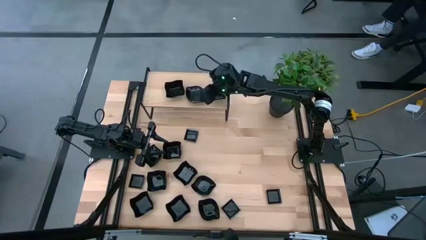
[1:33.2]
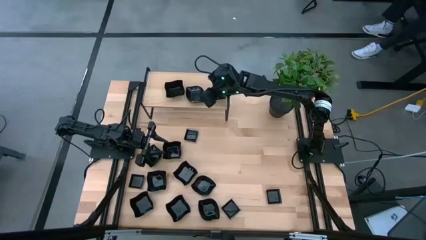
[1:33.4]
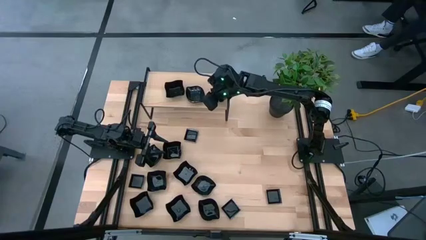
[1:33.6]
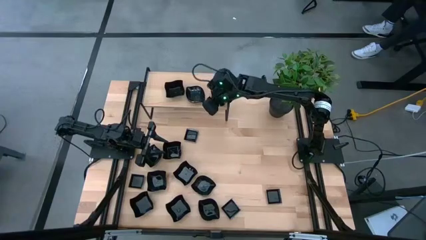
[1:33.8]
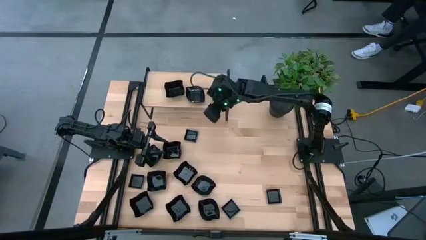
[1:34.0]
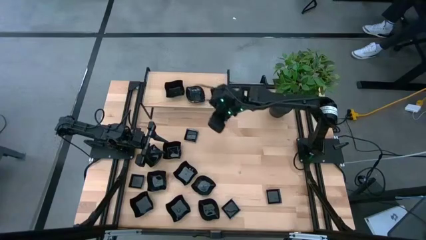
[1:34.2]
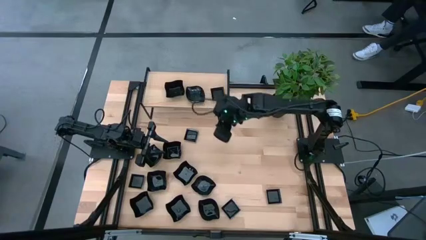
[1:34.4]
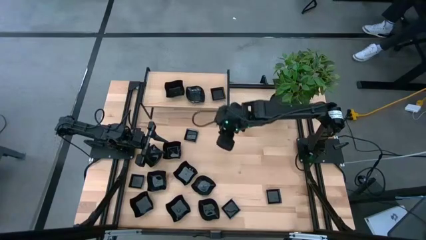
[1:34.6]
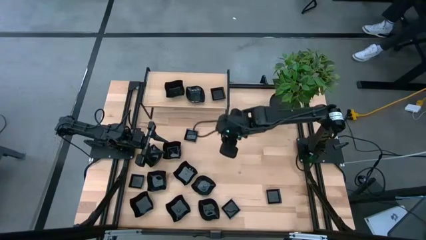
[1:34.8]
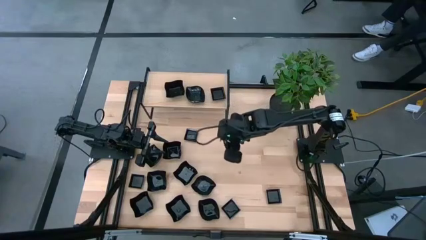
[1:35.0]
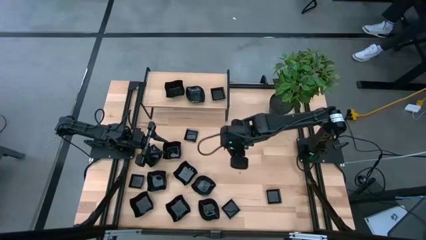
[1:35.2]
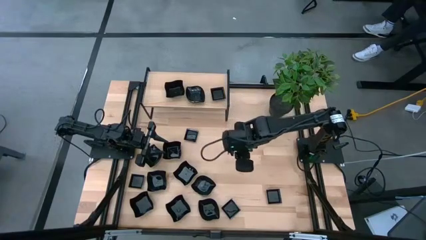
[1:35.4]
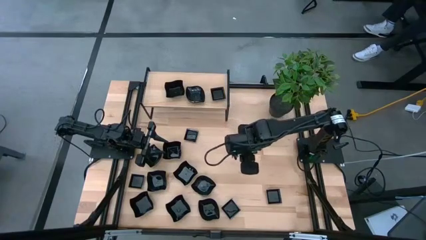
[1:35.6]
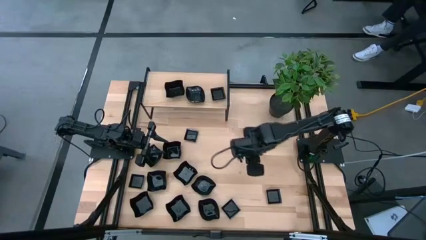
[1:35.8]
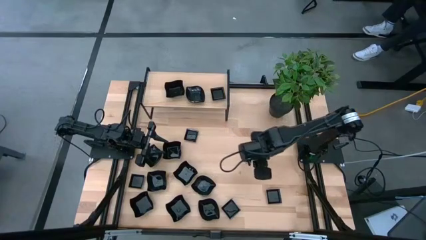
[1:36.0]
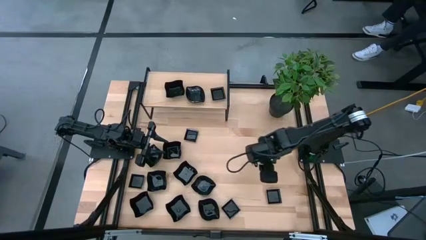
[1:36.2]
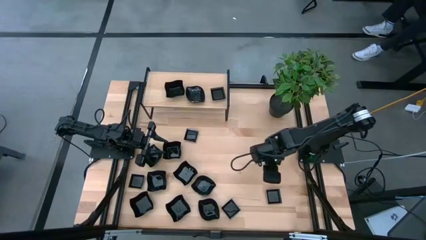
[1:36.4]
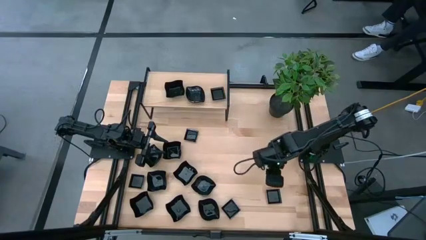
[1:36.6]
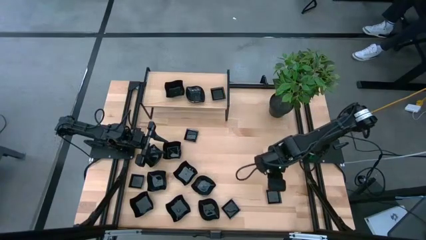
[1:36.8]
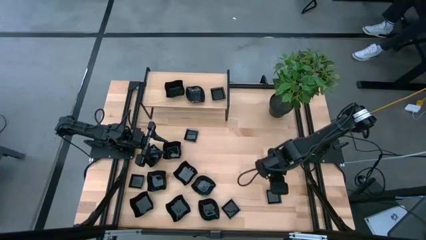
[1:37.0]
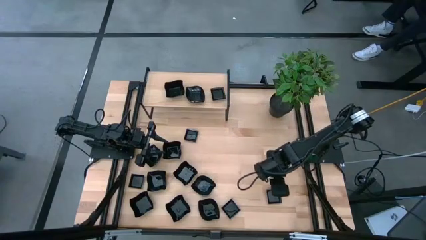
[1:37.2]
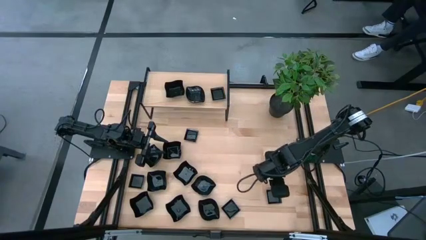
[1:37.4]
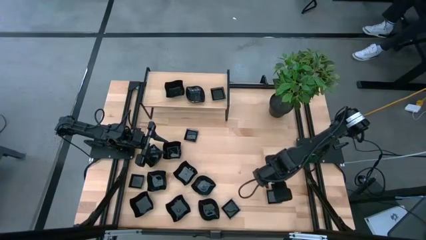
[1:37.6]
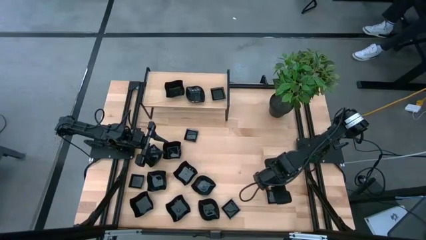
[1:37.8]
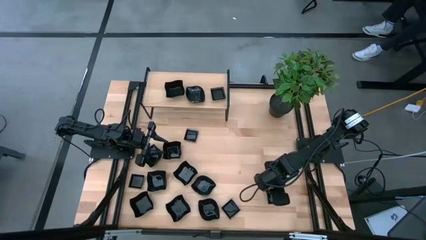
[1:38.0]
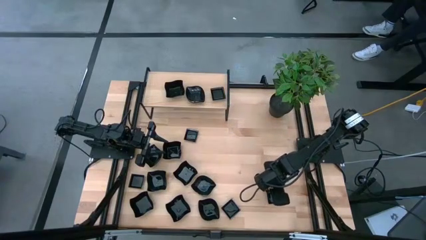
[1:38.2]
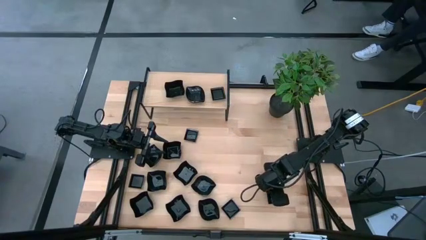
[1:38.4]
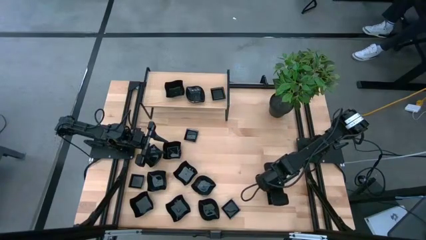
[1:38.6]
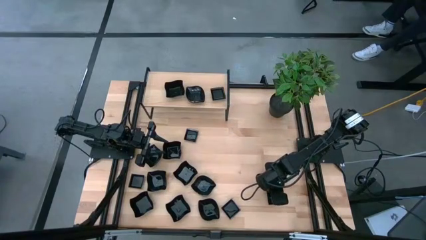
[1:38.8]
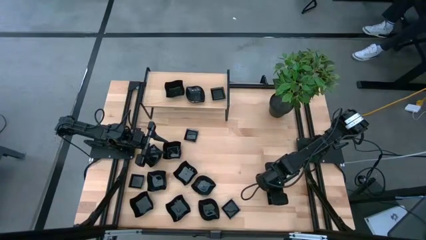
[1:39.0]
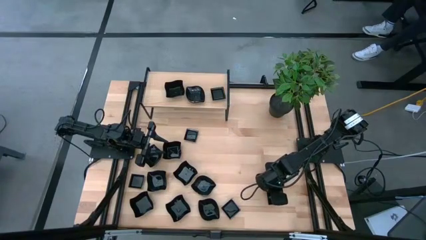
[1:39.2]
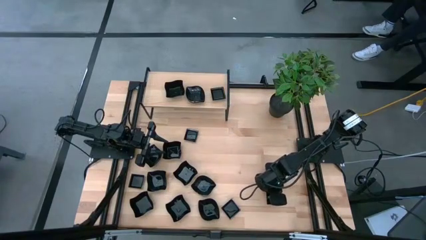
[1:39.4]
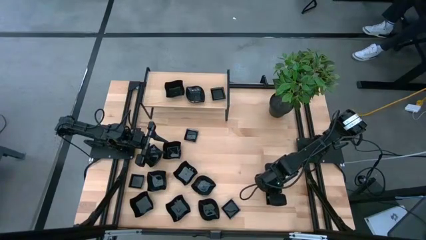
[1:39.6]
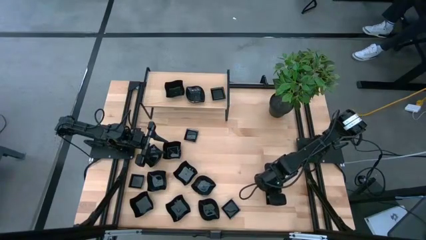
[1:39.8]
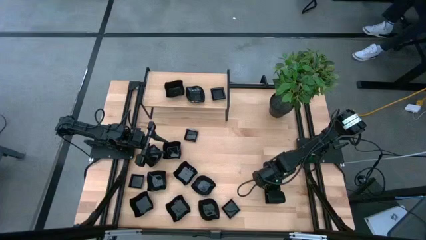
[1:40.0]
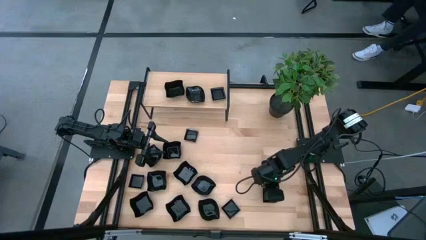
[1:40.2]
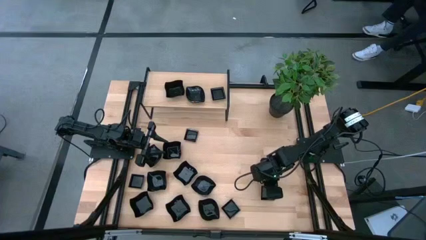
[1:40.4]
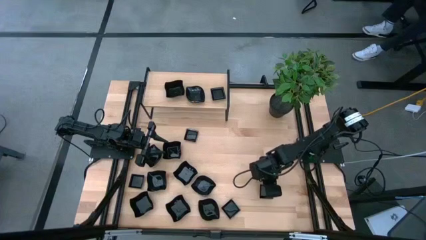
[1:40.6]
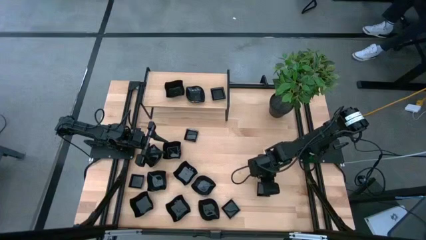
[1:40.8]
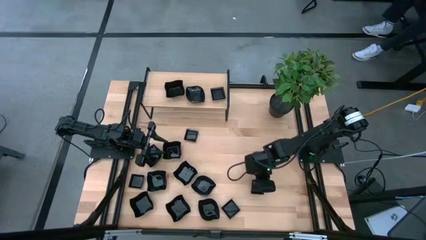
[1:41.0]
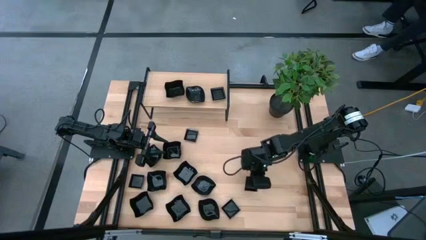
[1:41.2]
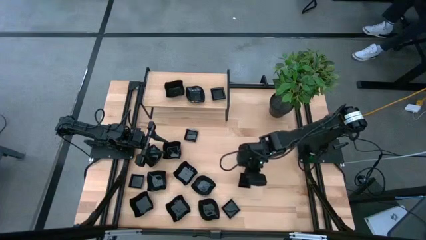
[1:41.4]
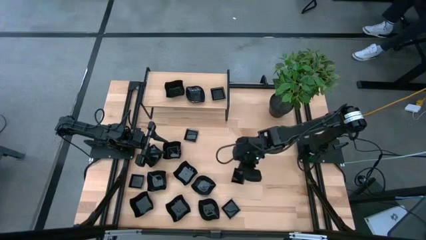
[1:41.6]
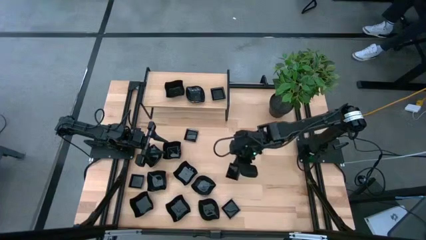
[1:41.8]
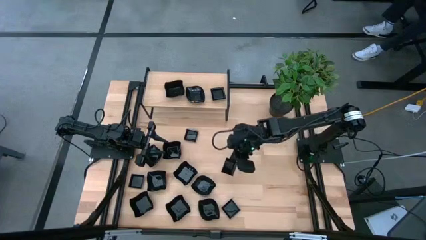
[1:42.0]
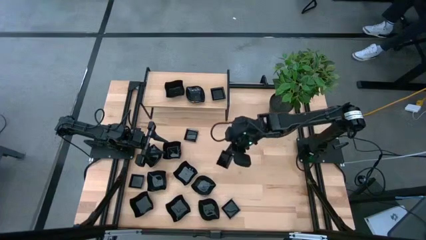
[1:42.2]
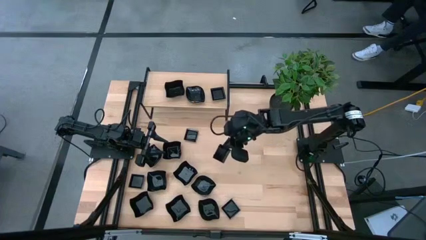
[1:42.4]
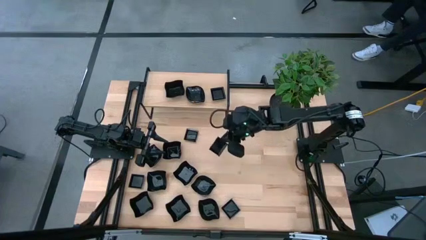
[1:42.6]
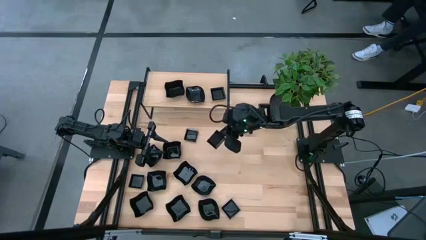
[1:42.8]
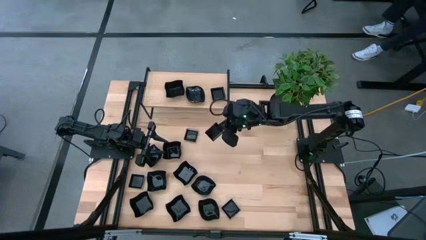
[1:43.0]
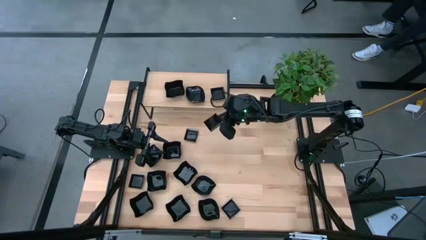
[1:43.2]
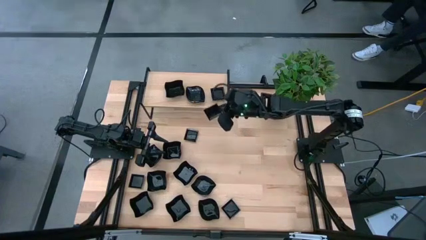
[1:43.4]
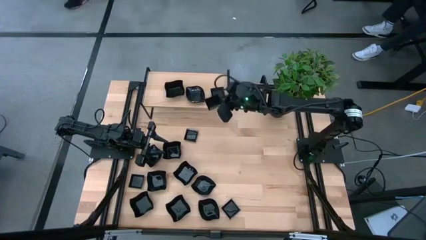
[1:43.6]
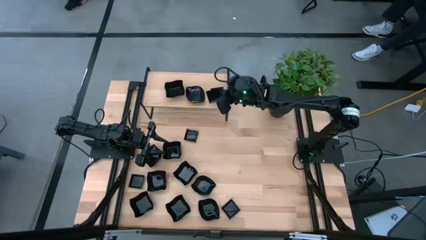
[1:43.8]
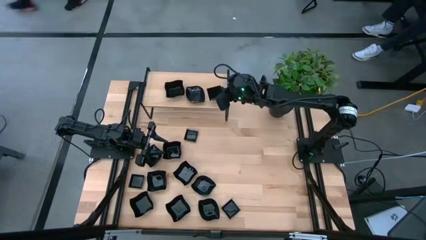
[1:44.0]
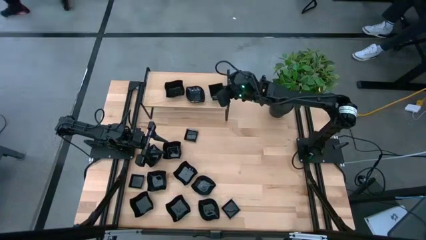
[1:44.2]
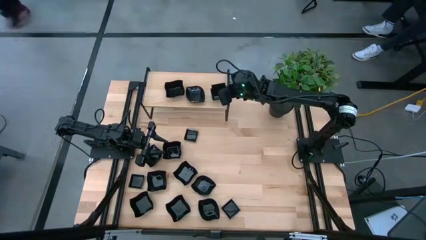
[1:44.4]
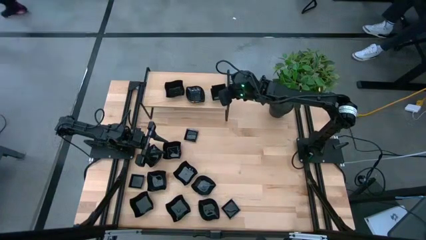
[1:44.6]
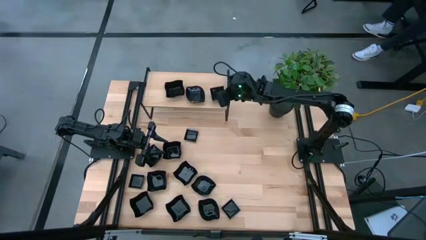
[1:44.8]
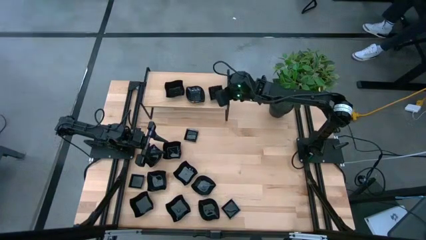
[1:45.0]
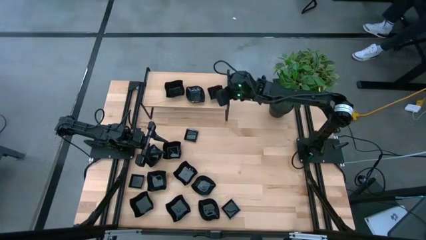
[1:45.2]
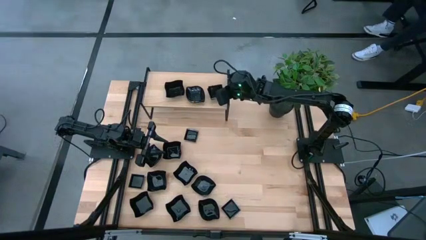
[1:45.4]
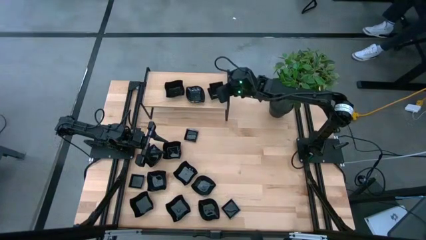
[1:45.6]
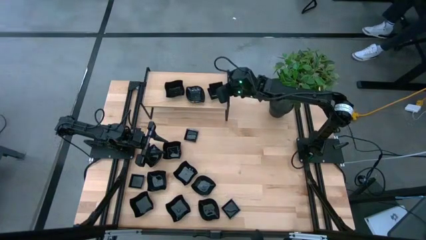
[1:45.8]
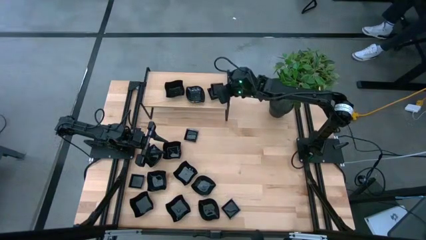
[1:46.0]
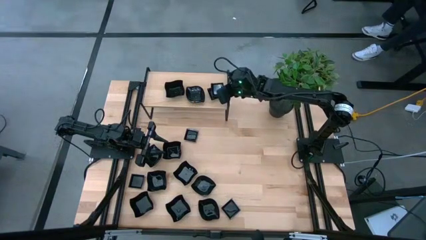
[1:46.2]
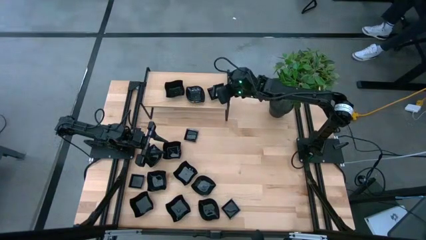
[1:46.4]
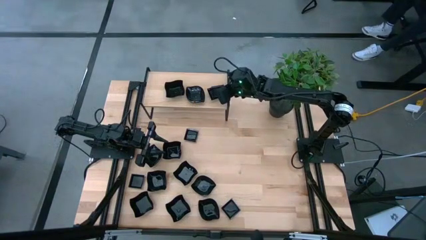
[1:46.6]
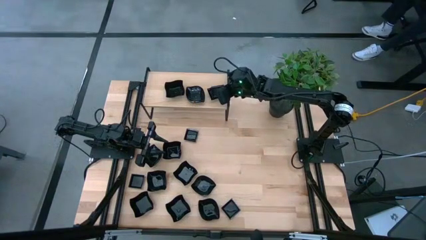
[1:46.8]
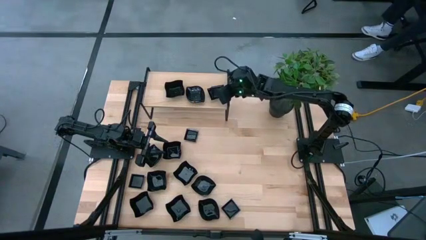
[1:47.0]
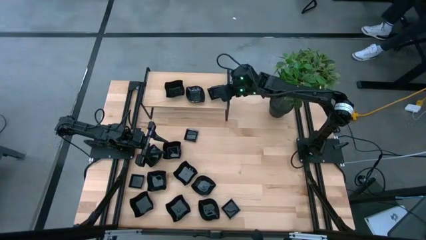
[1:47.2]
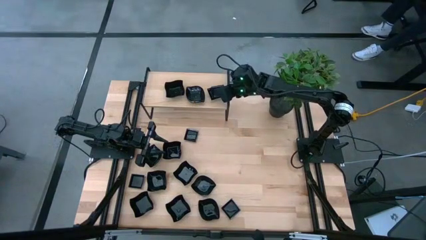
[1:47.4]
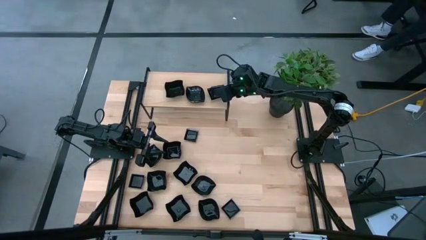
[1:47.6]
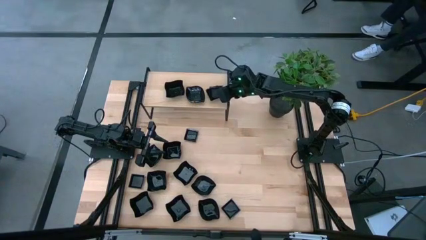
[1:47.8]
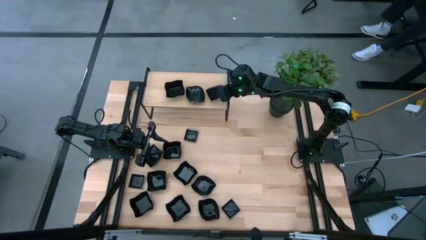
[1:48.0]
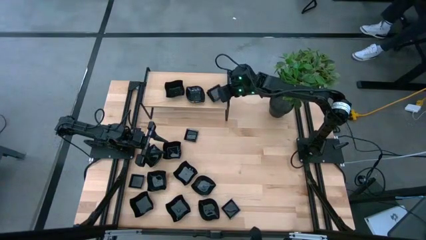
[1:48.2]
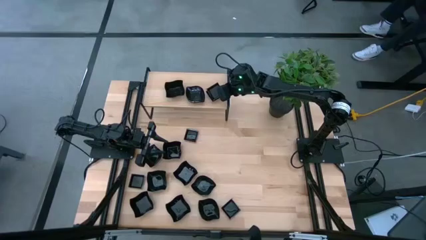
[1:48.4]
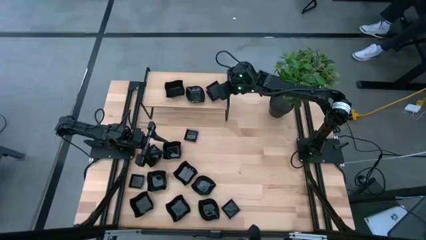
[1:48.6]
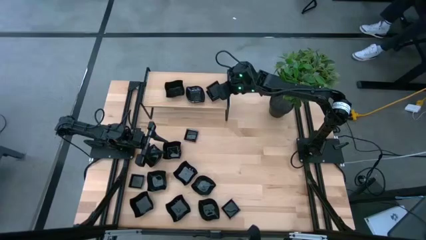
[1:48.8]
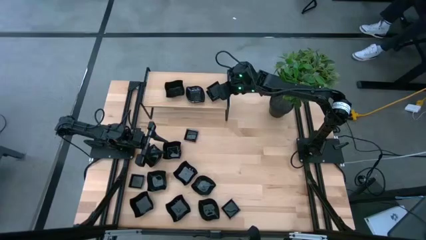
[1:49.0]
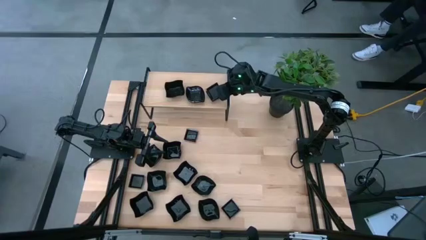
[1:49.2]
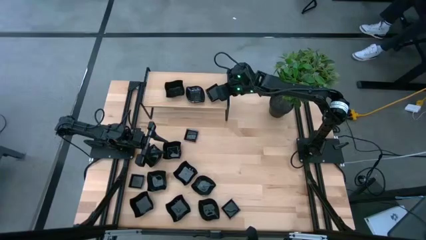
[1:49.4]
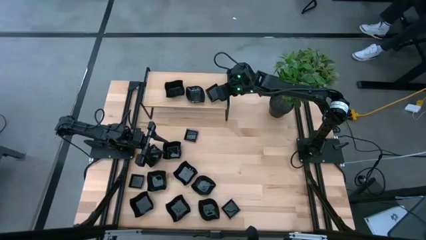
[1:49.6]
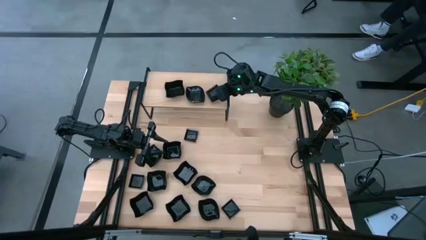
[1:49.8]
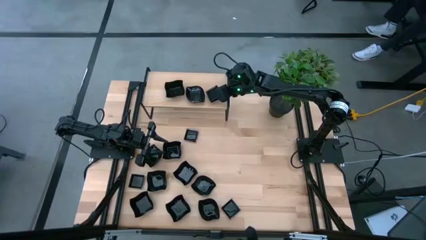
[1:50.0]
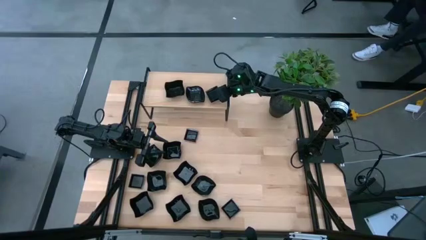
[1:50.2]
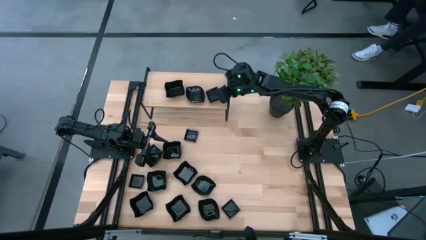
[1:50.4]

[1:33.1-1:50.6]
Task: Pick & Place Mini shaped plates
Stack the square plate on top of the square plates on the shelf
